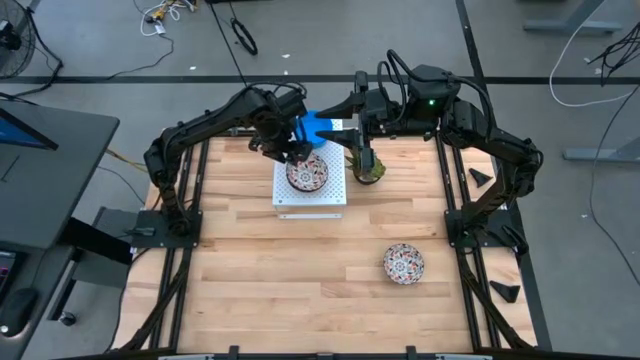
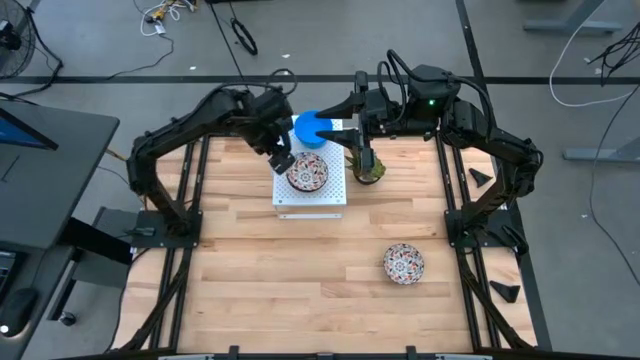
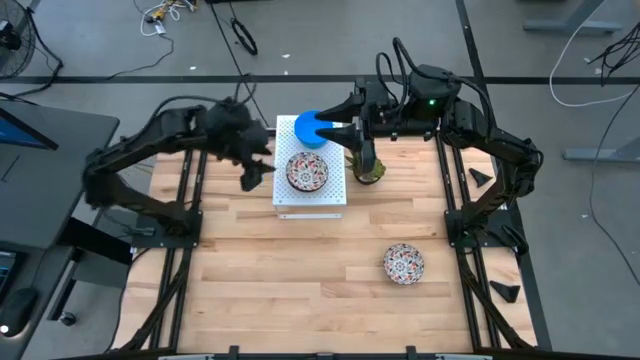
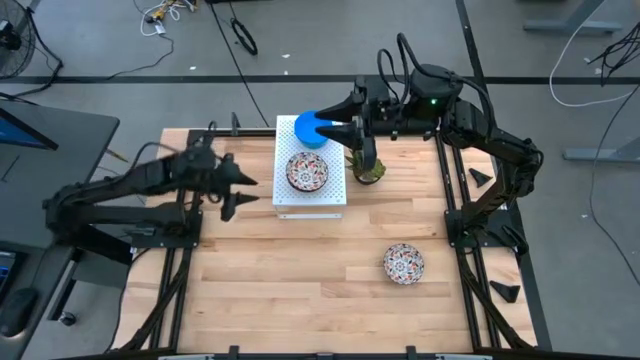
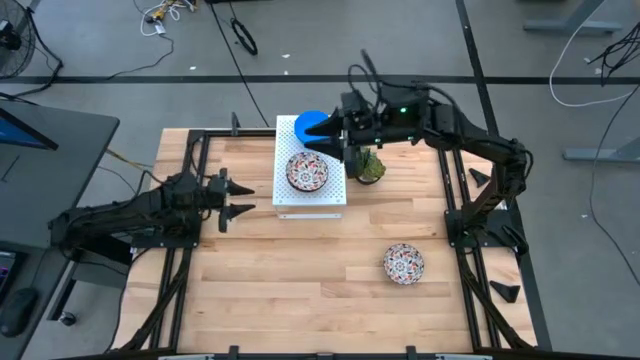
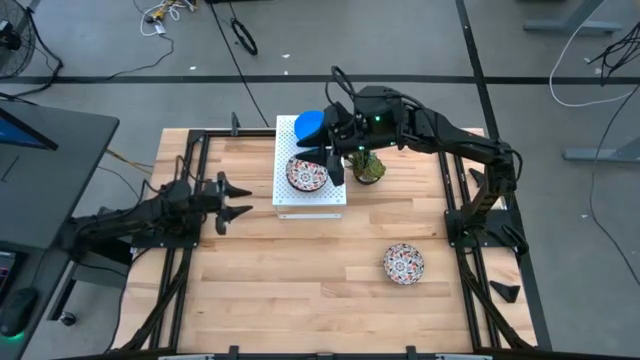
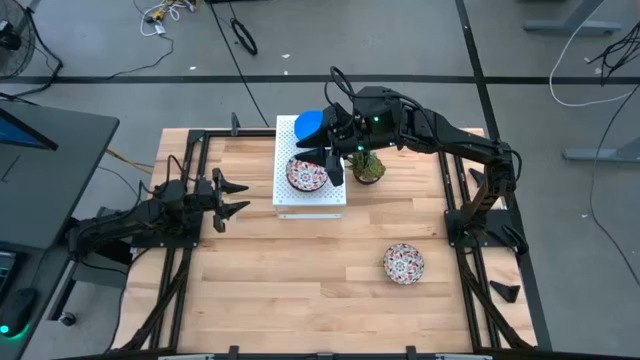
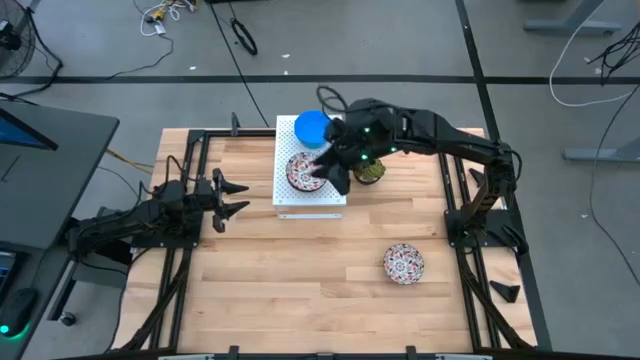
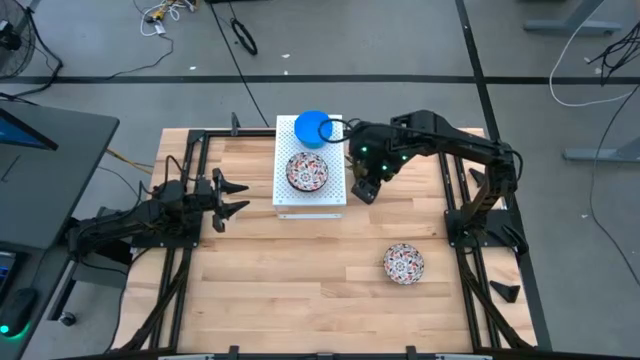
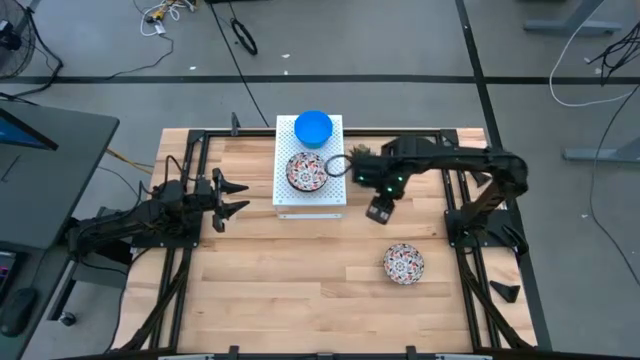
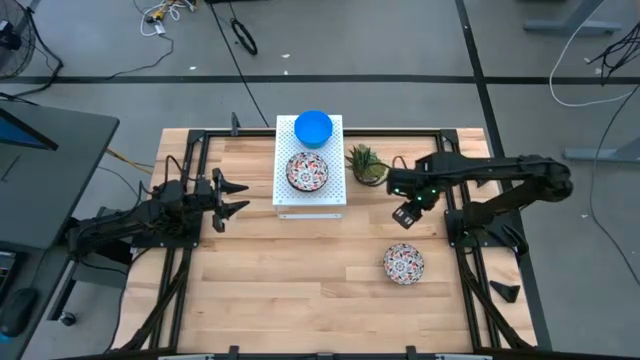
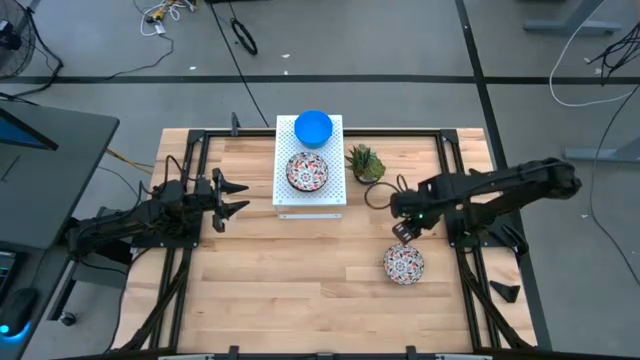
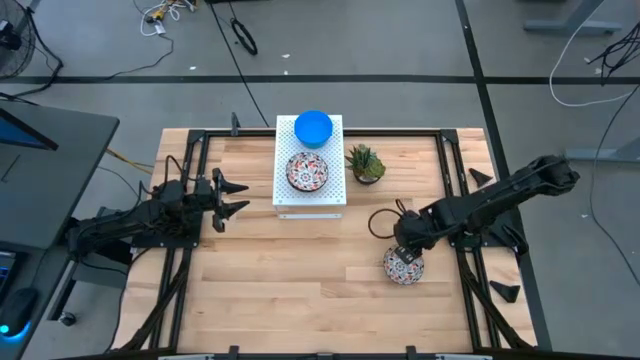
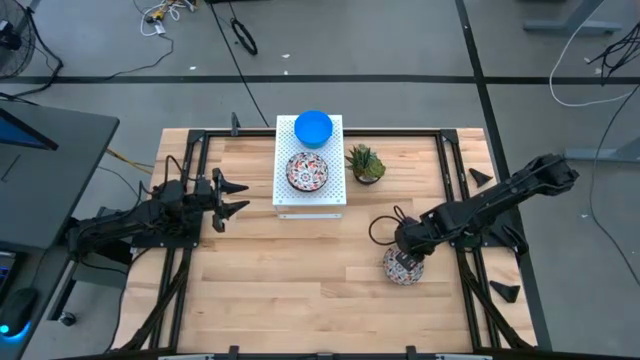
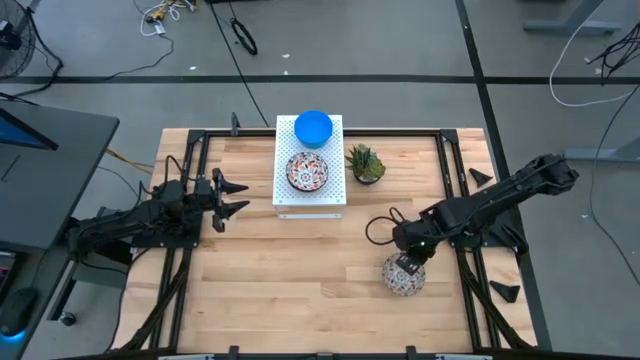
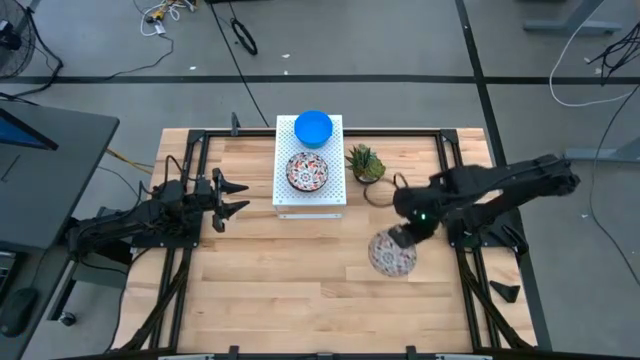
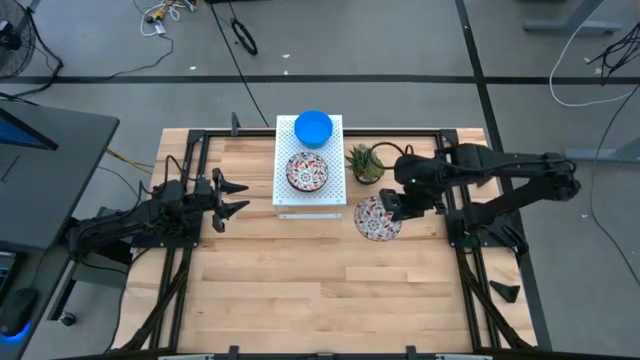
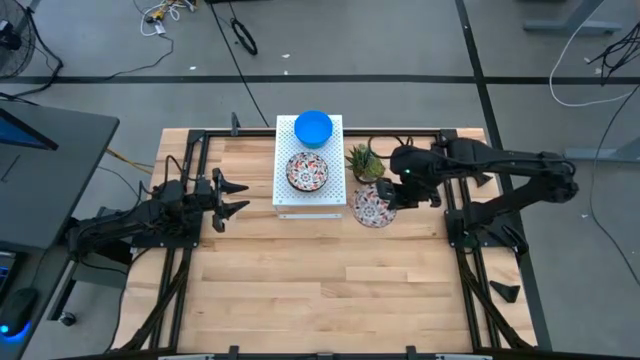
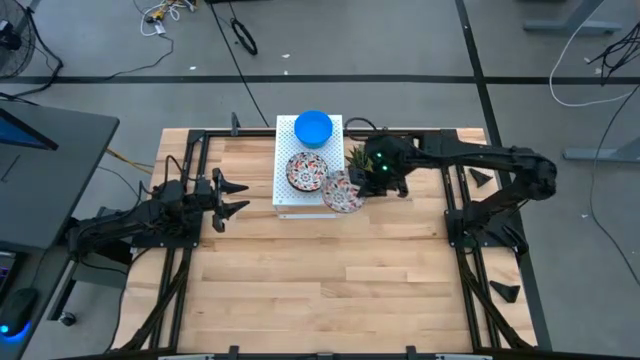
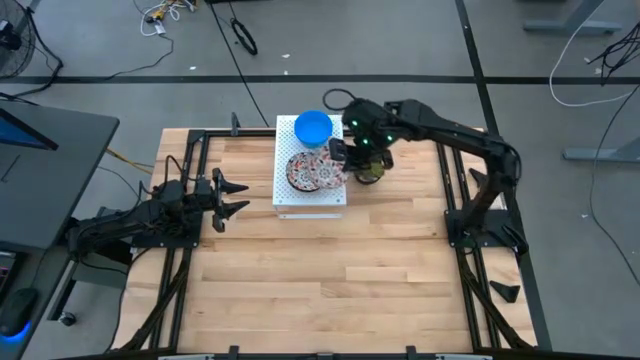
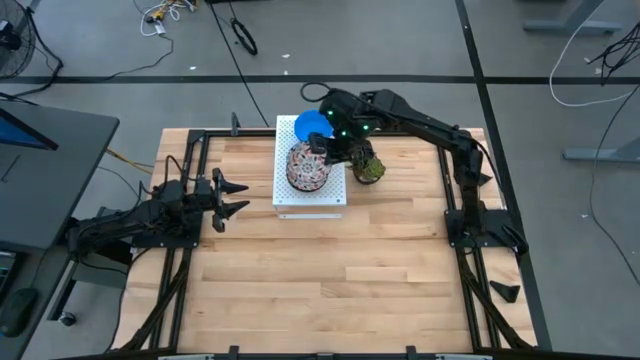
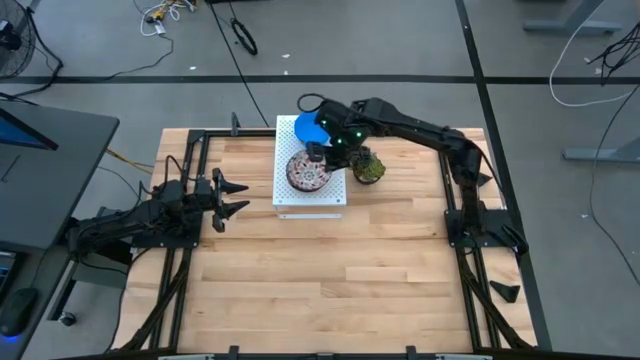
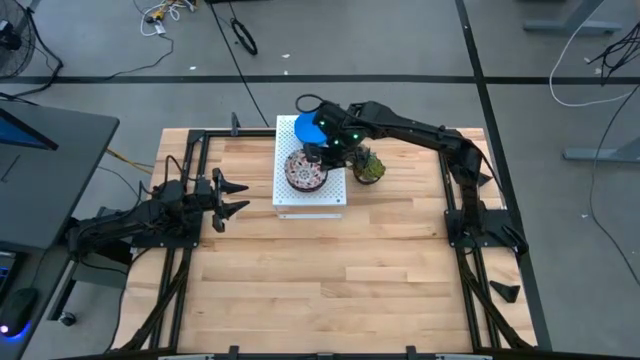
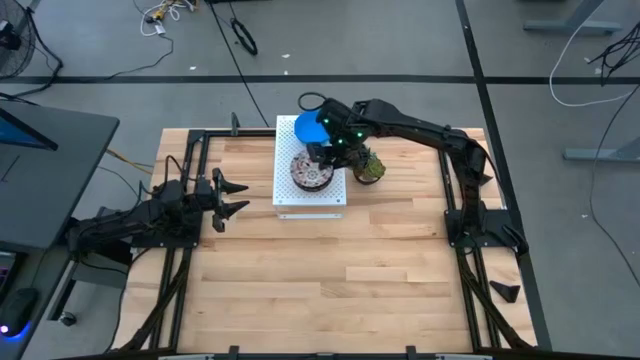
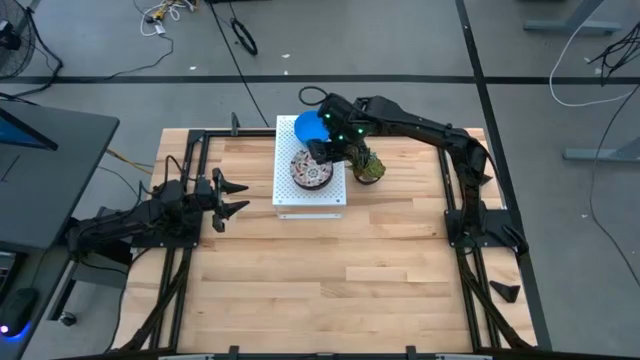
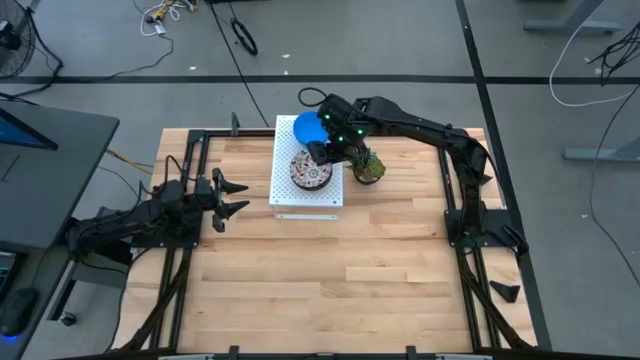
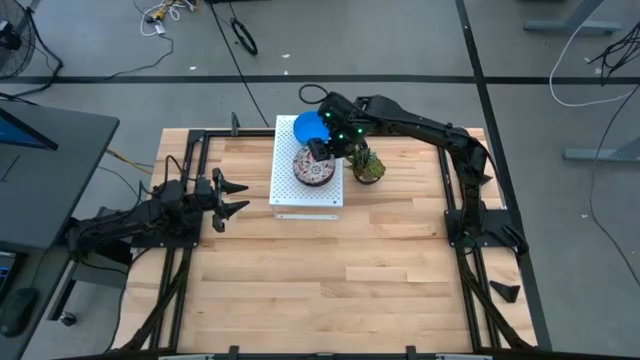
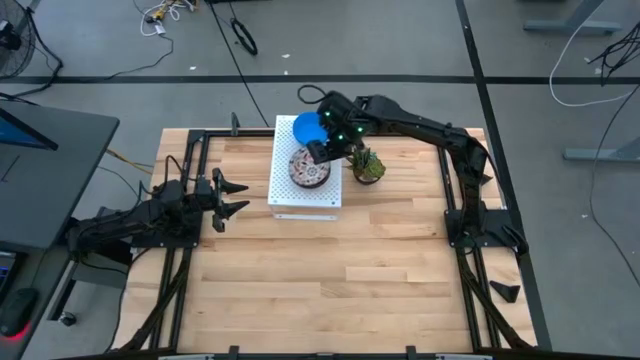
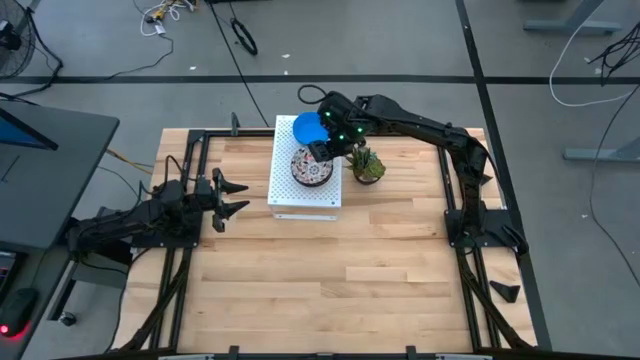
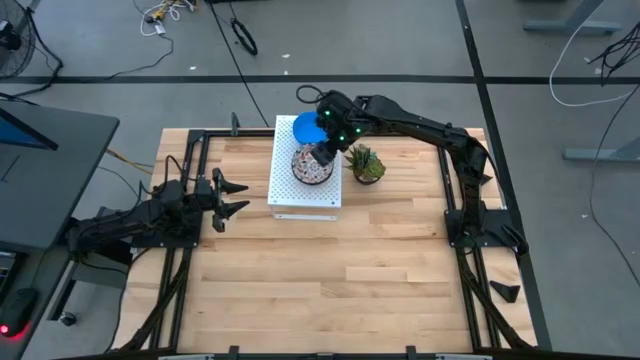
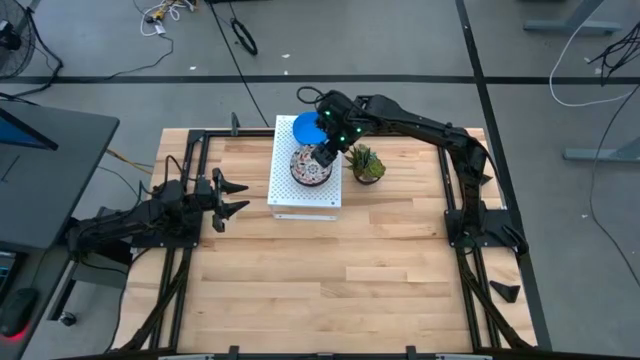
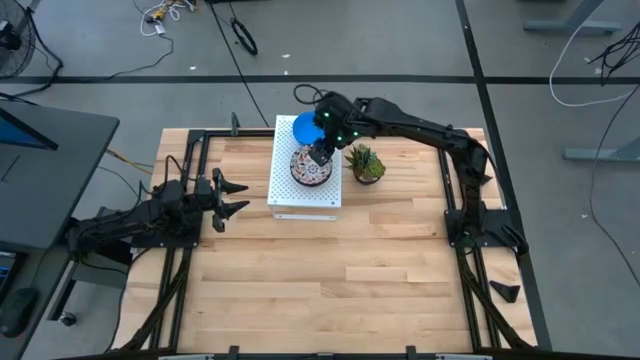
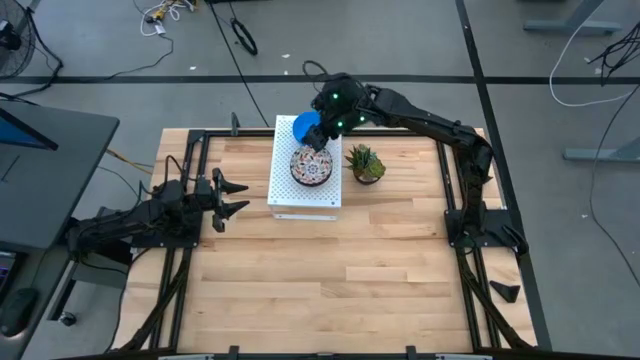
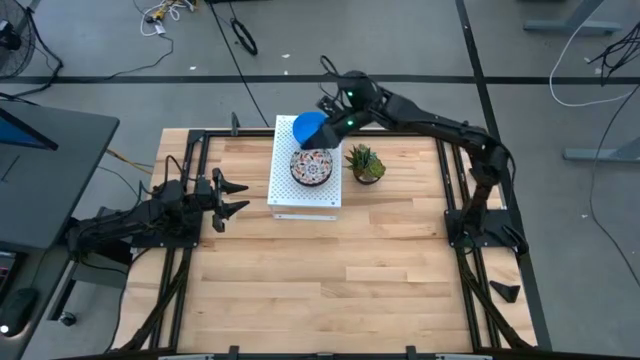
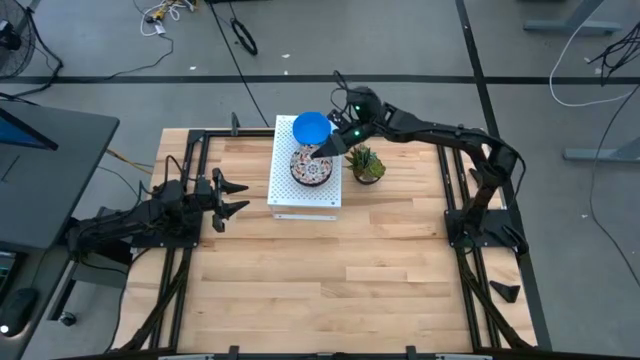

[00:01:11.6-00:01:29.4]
Task: Pick & Place Mini bowls
Stack the white patterned bowl on top of the white patterned bowl on the shelf

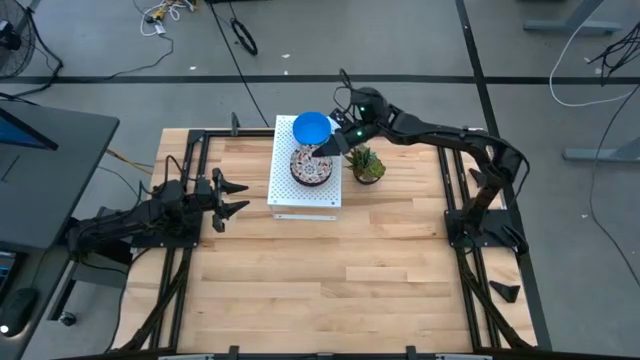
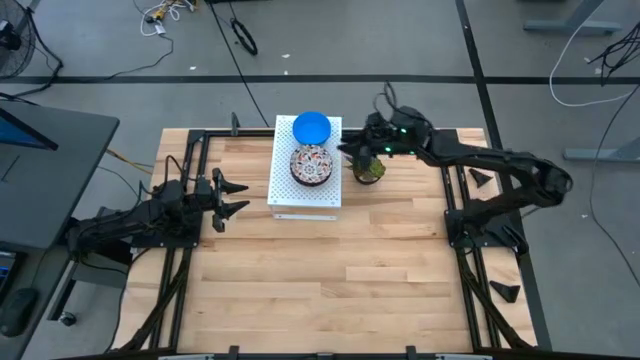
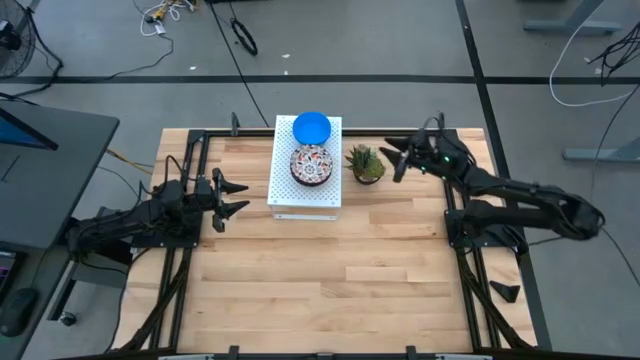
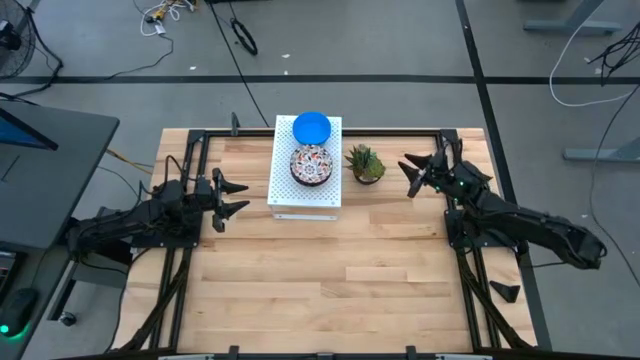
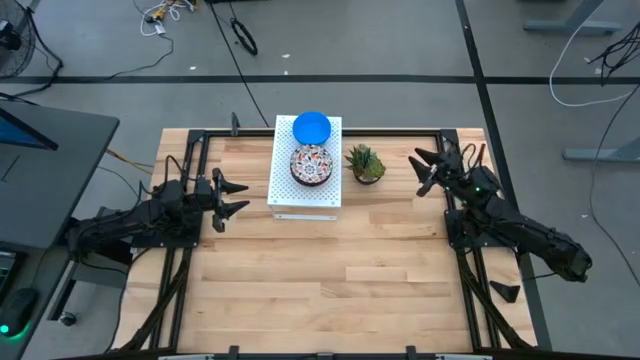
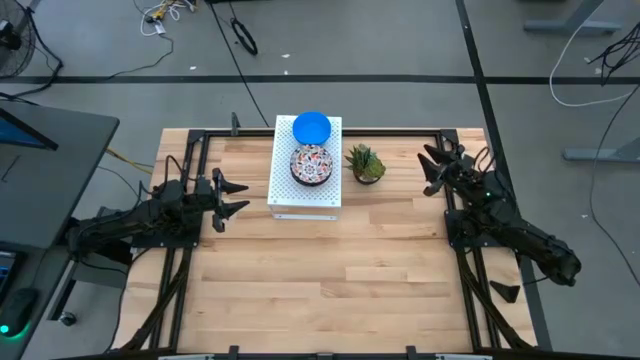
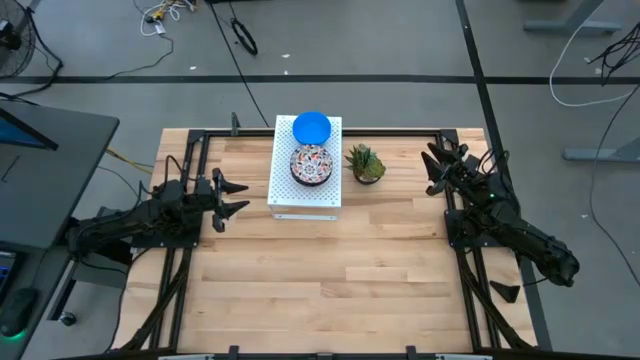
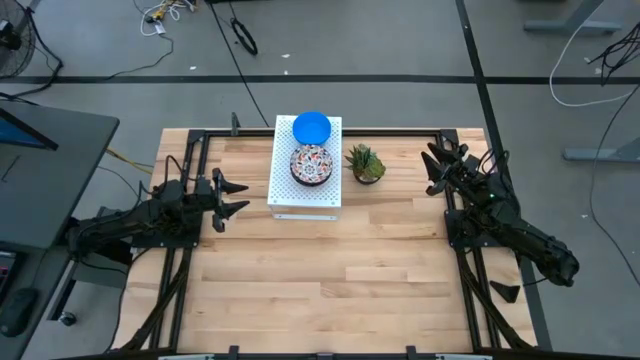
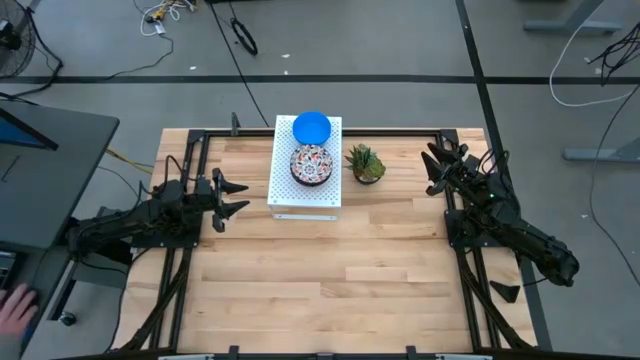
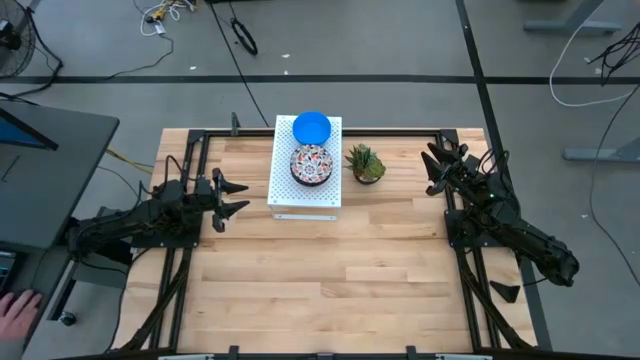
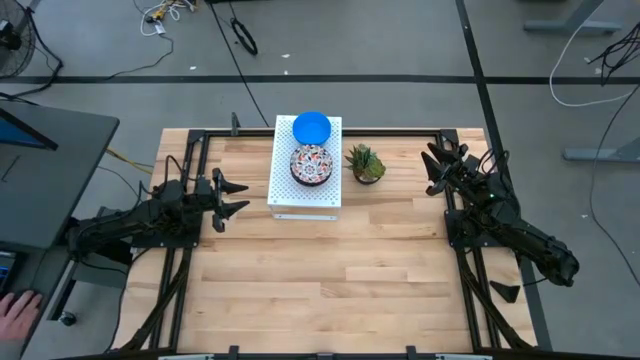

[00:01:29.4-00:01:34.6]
Return to Home Position
